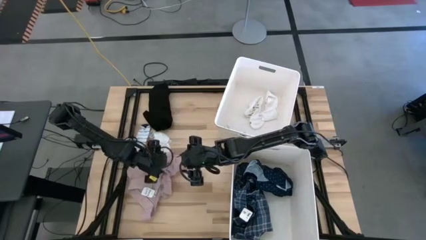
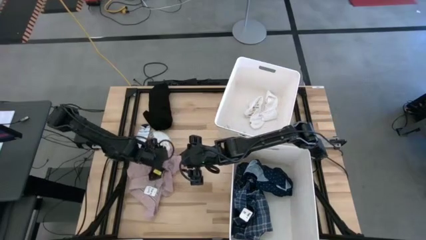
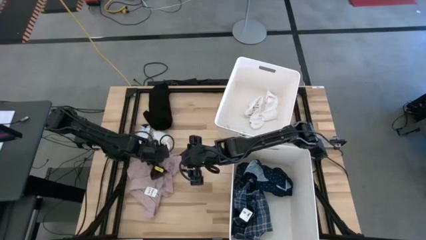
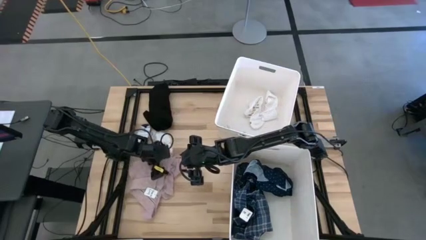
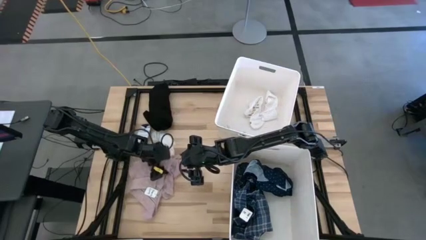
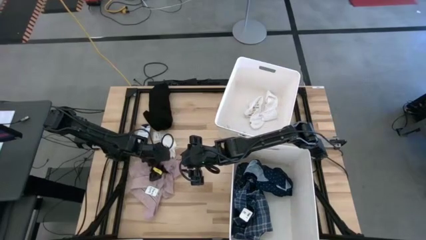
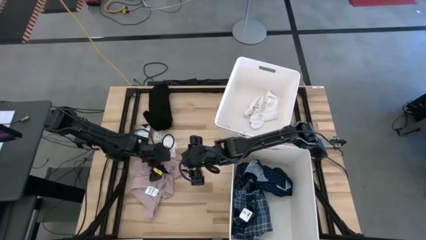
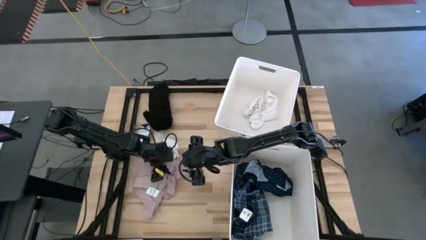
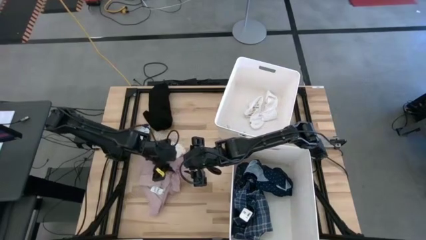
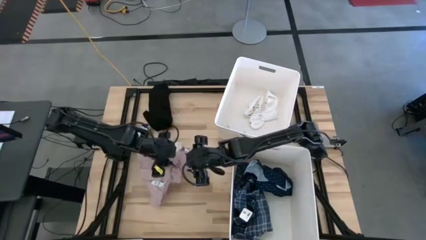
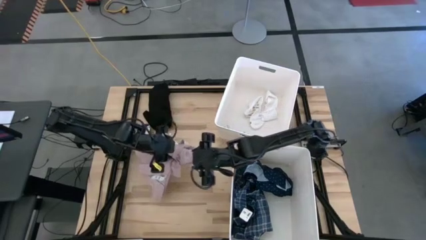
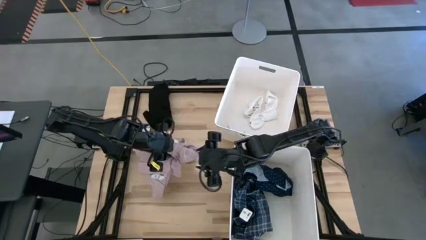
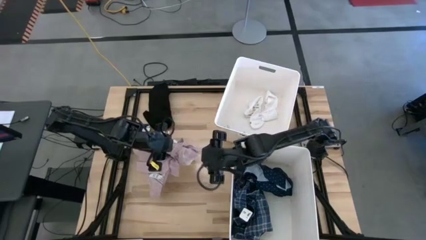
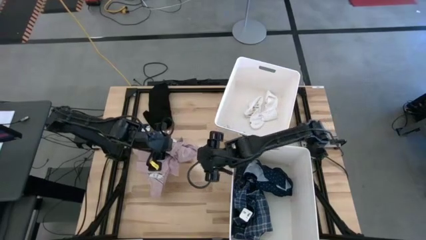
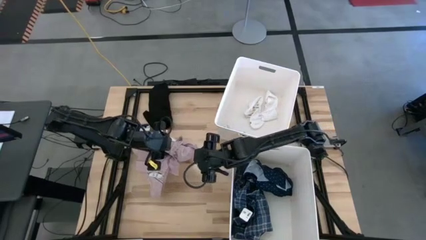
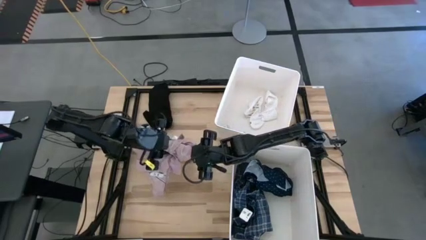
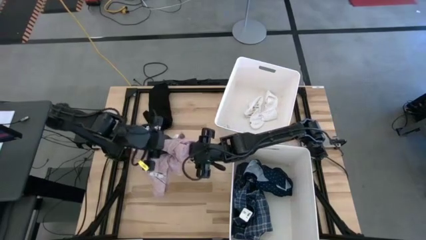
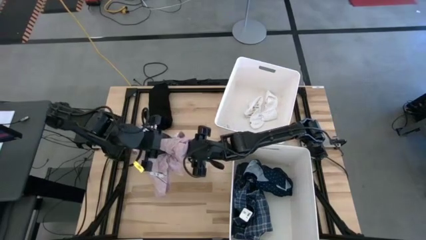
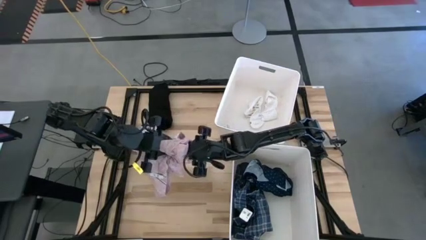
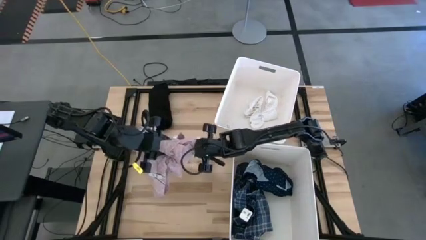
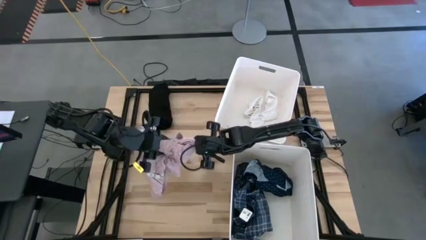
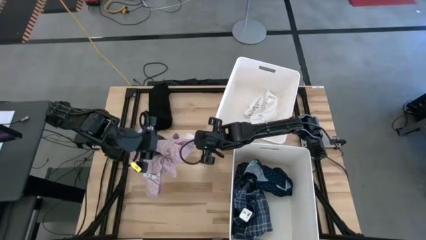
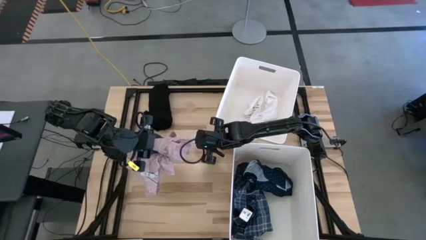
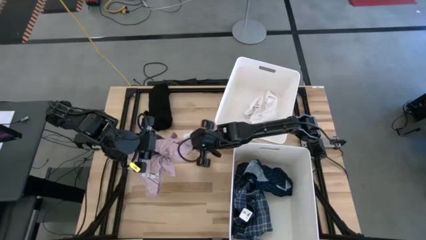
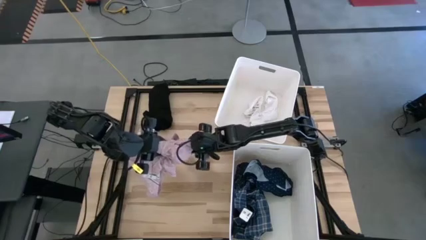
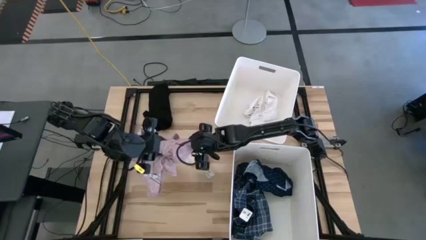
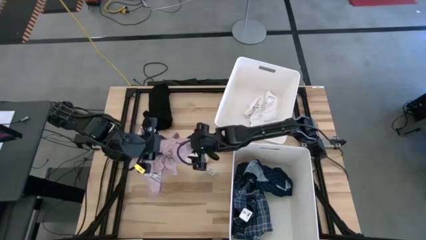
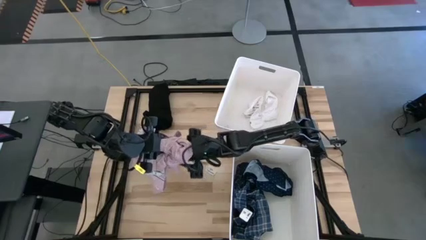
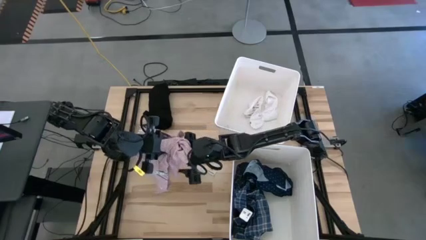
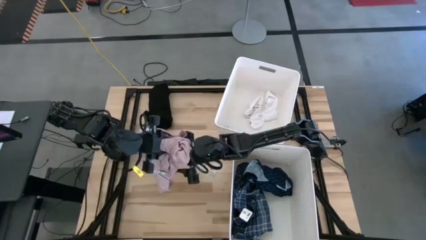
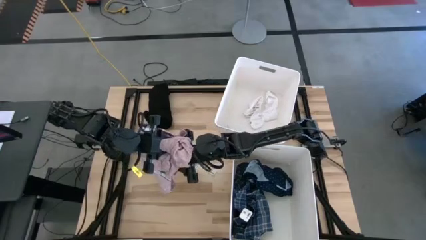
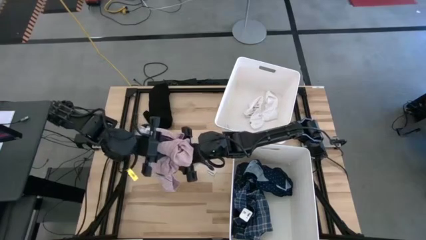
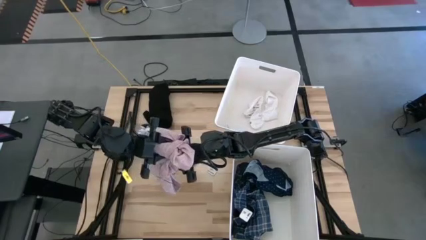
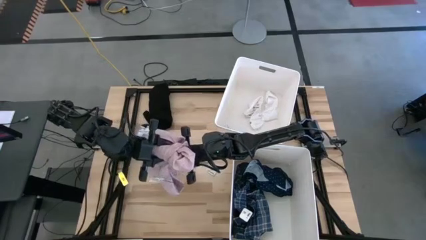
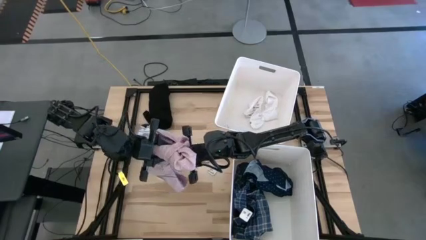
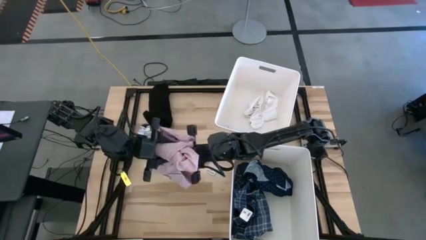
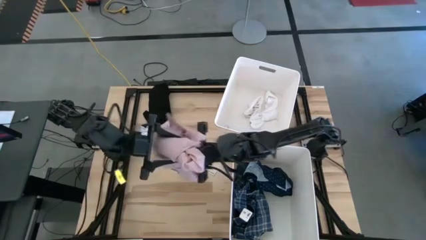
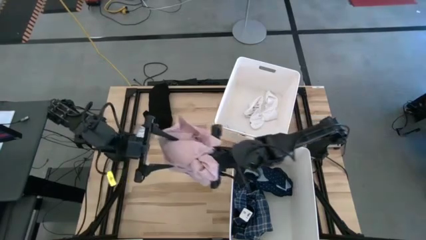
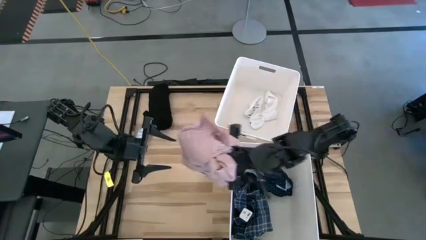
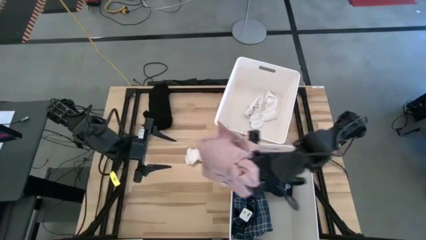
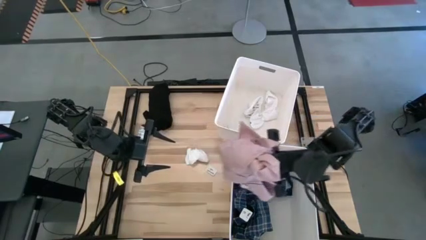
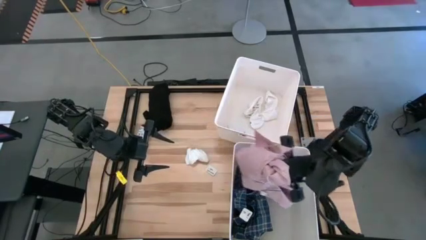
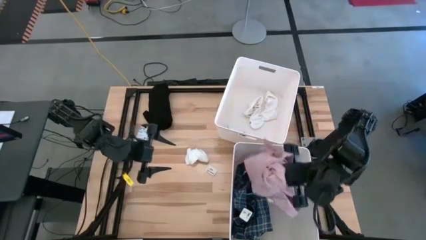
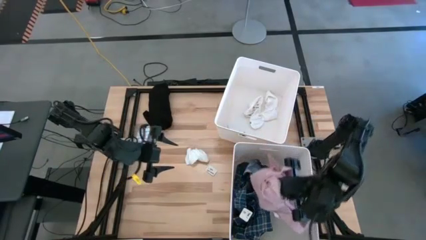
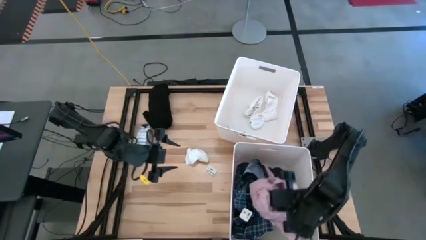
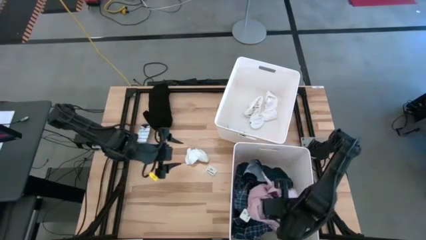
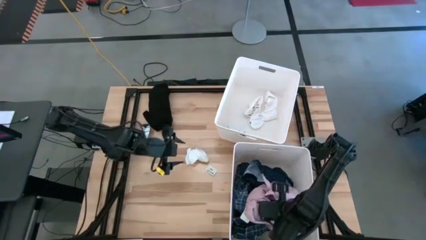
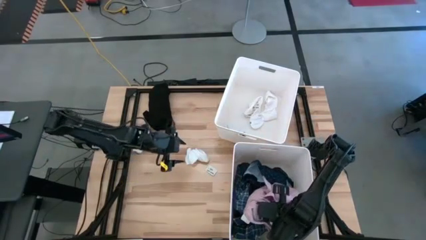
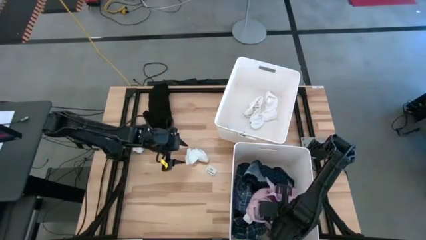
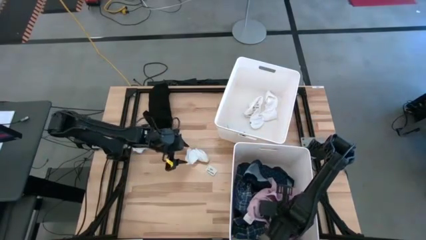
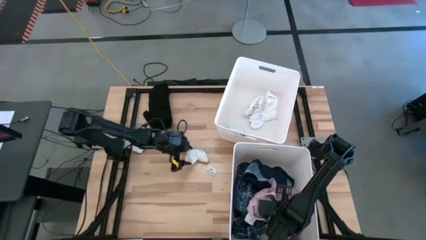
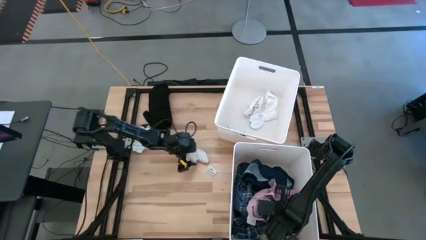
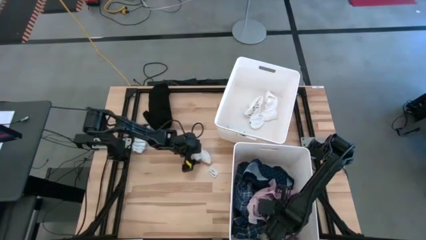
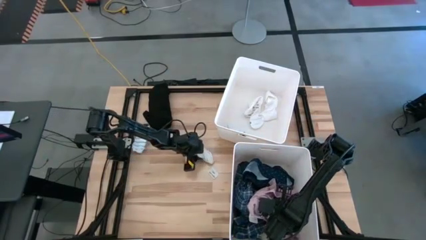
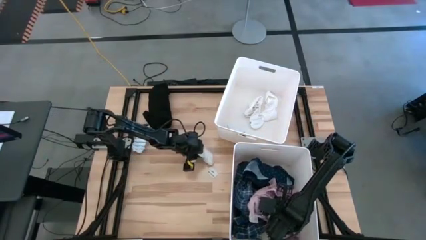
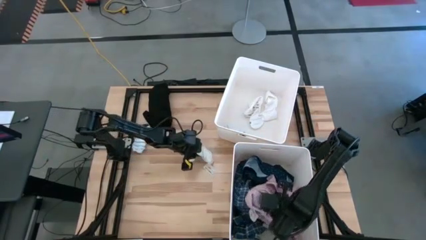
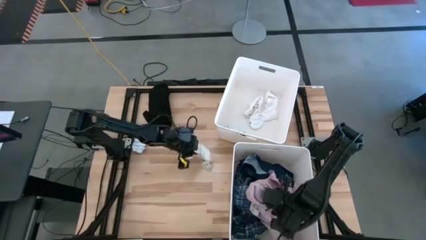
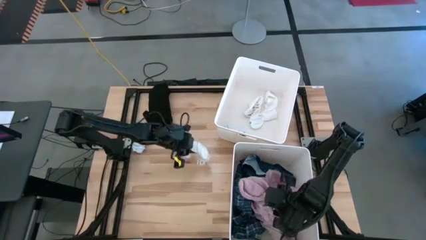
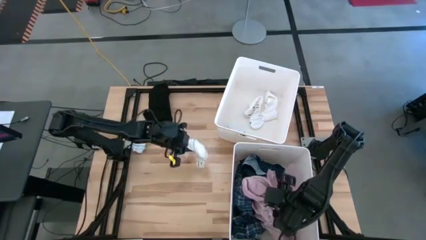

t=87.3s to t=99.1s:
Task: Sort clothes
Put the light red polo shirt into the bottom white laundry bin

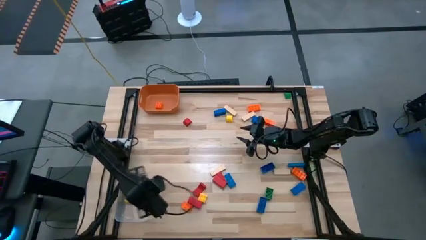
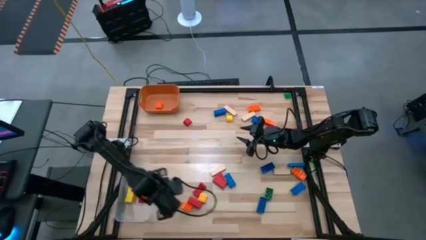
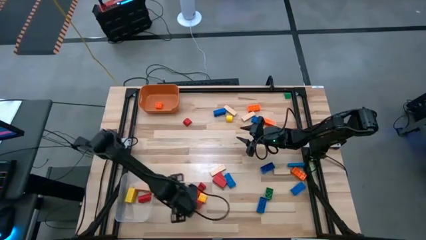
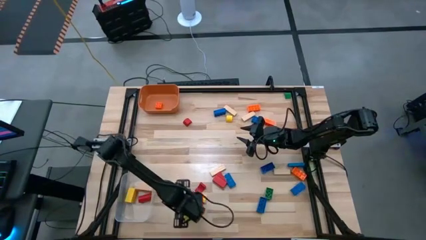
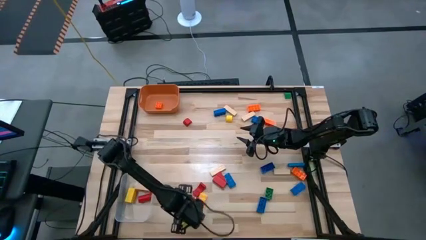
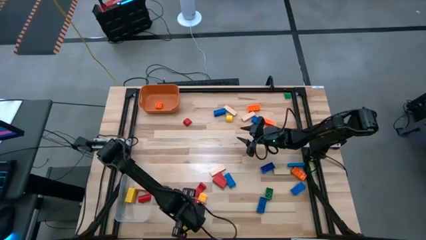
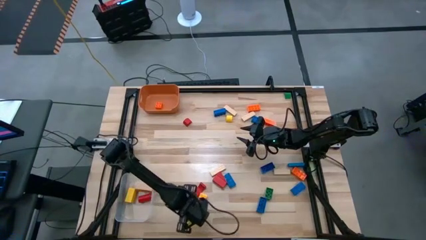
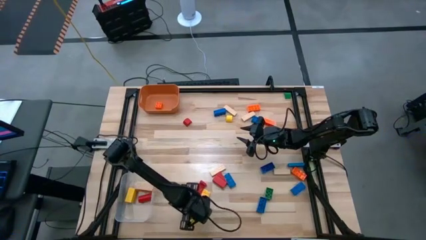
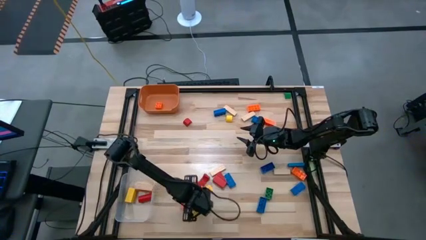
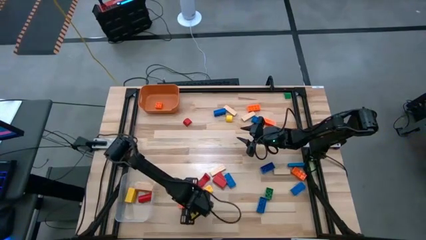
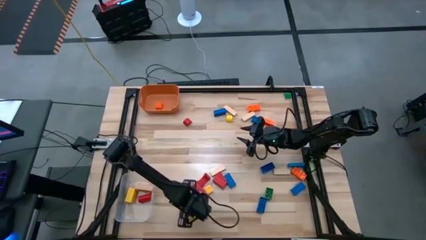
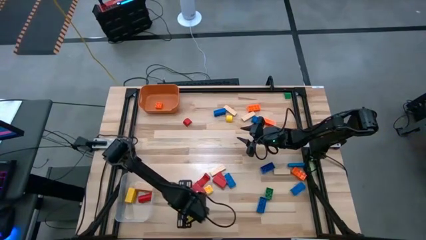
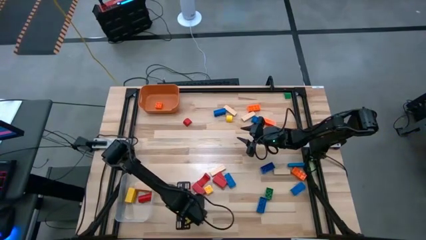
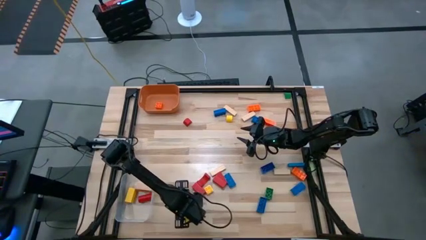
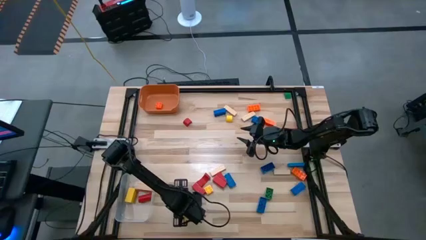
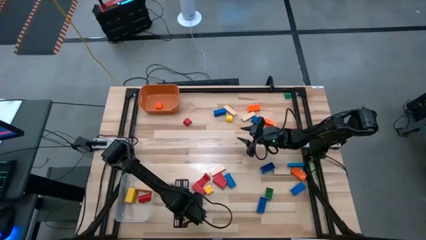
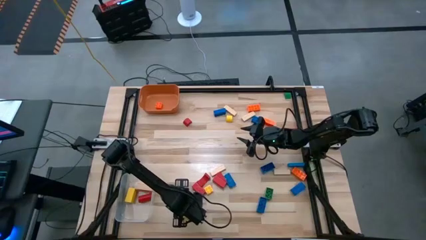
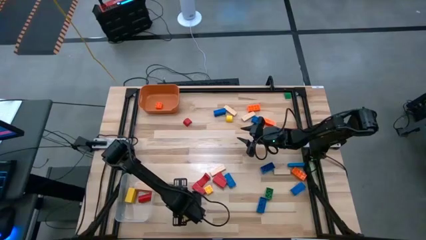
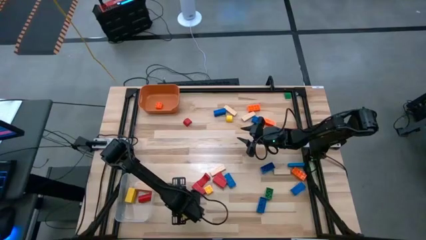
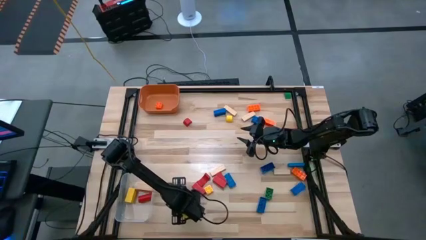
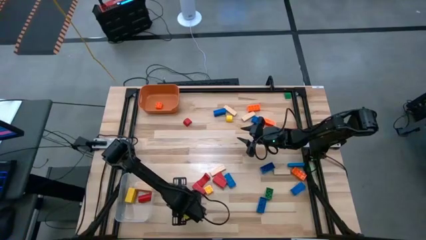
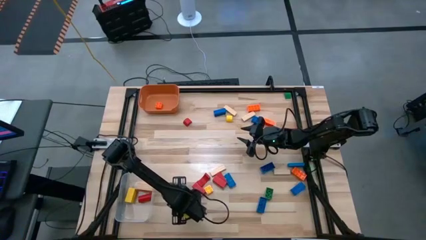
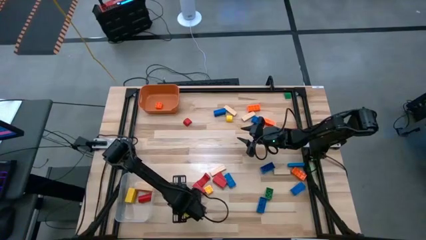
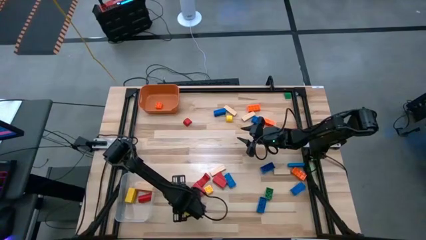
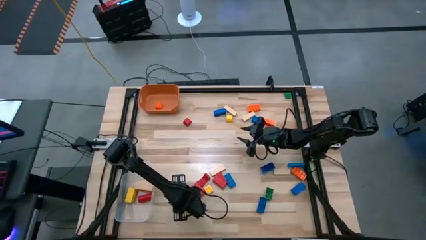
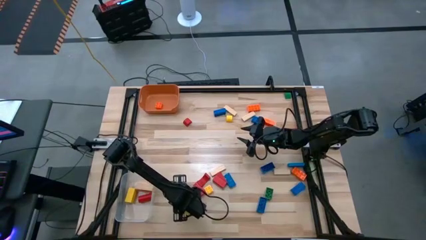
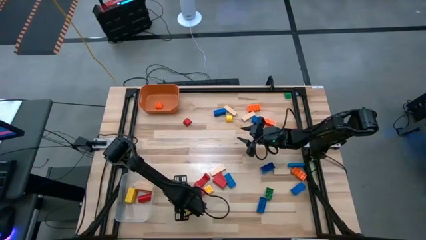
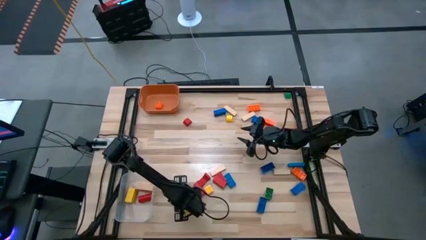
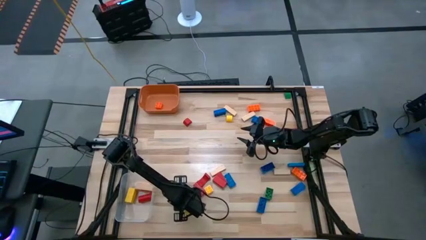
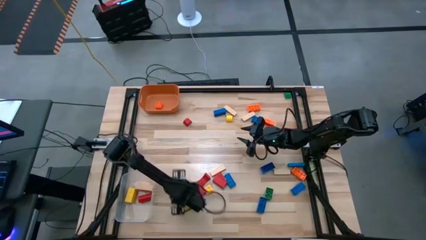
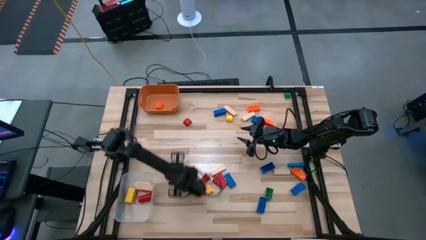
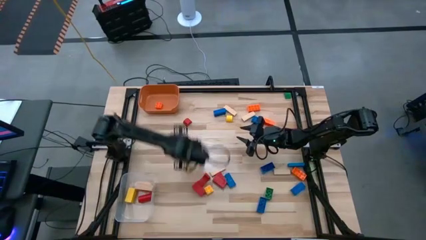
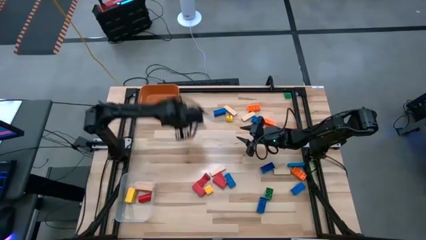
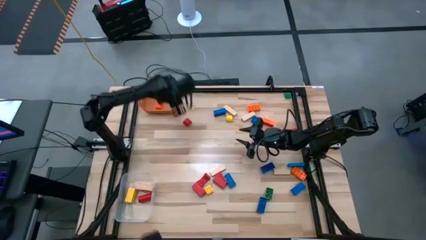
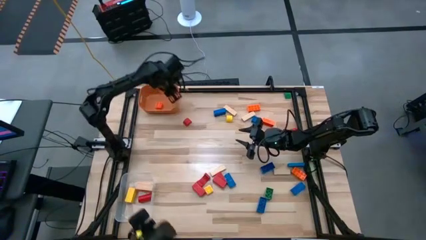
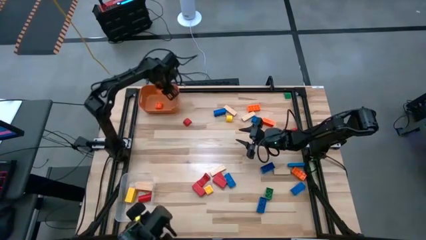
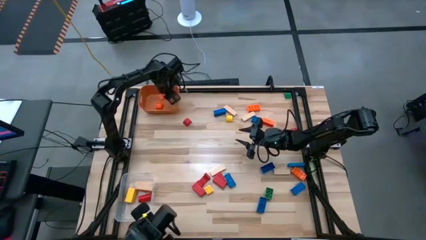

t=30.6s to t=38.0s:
Task: Sort blocks by size
Put the small orange game piece into the orange bin
